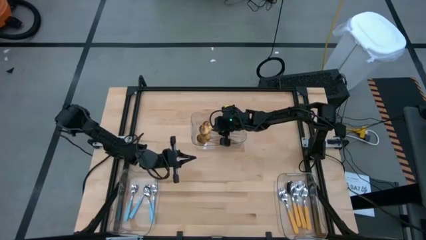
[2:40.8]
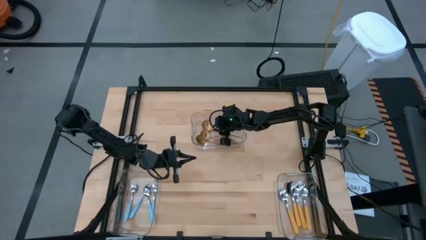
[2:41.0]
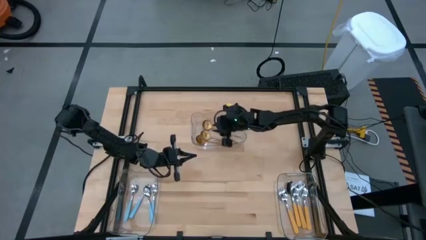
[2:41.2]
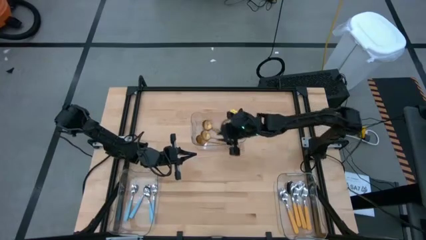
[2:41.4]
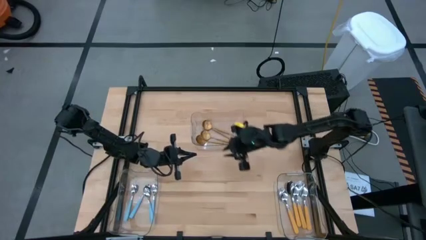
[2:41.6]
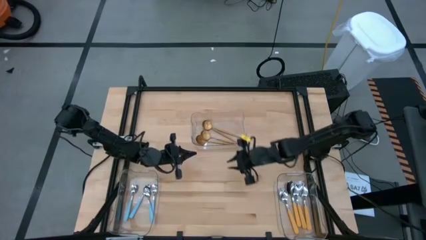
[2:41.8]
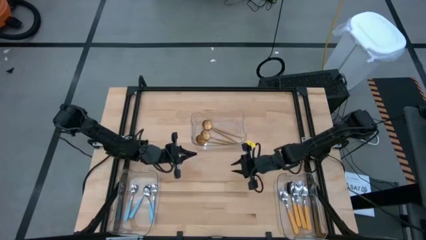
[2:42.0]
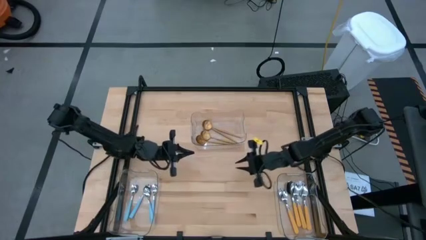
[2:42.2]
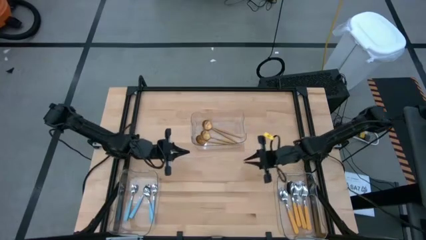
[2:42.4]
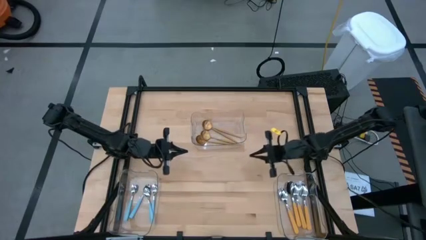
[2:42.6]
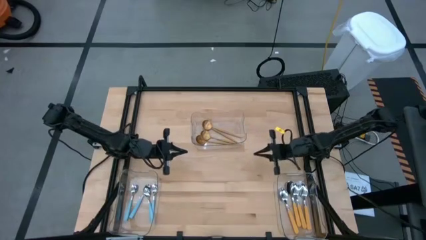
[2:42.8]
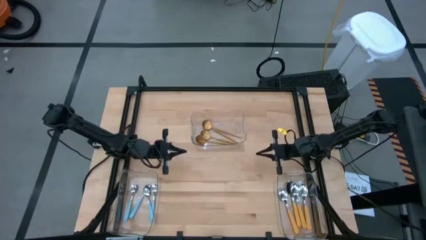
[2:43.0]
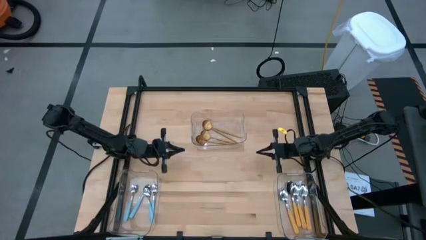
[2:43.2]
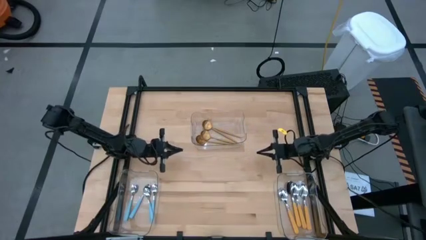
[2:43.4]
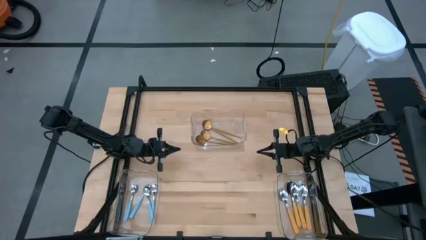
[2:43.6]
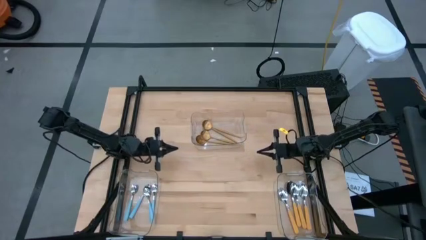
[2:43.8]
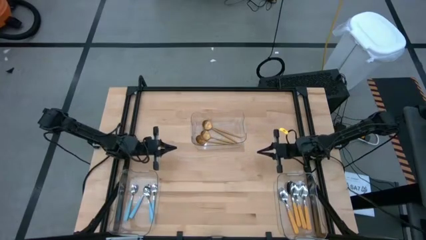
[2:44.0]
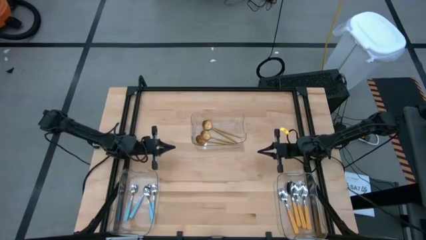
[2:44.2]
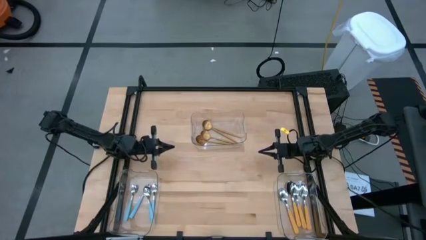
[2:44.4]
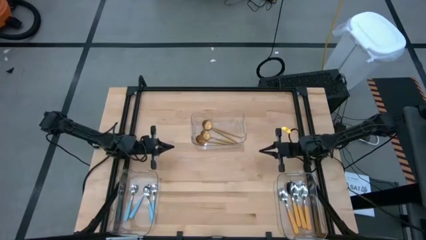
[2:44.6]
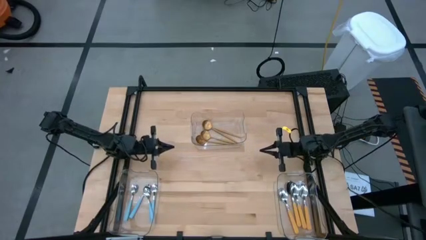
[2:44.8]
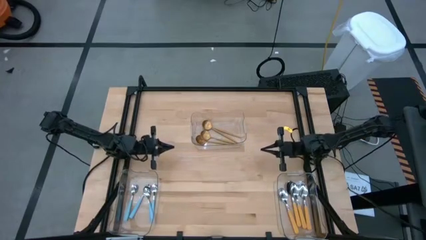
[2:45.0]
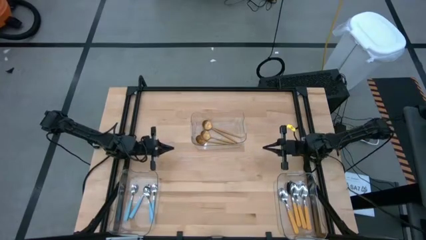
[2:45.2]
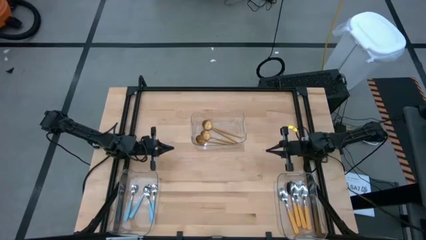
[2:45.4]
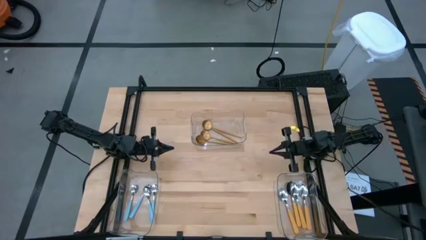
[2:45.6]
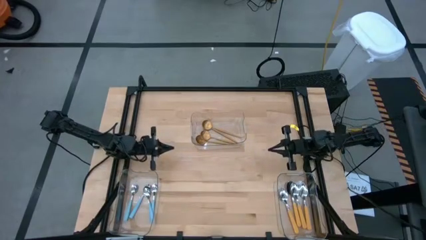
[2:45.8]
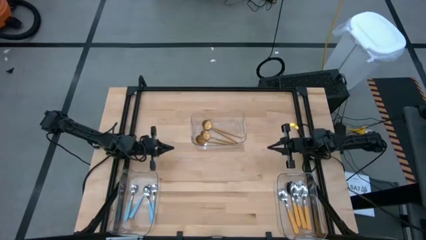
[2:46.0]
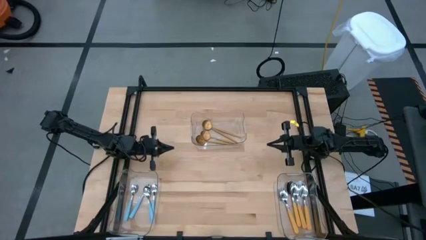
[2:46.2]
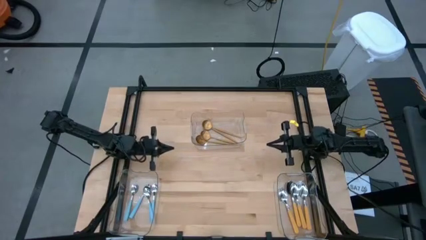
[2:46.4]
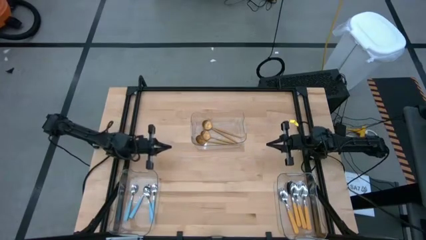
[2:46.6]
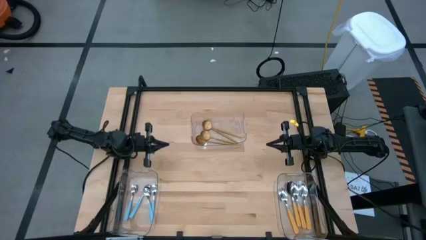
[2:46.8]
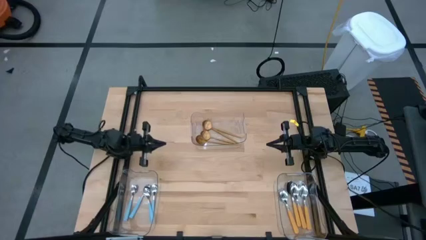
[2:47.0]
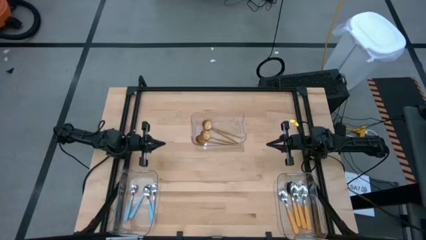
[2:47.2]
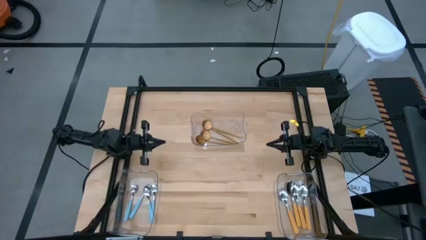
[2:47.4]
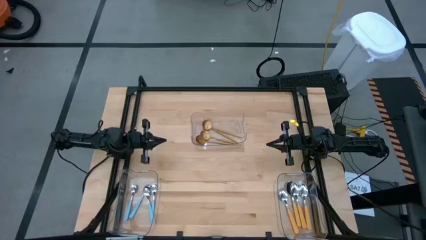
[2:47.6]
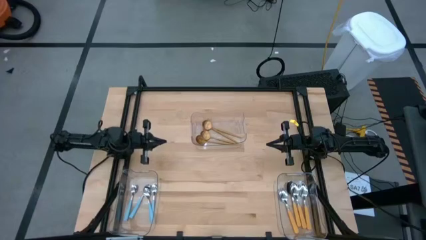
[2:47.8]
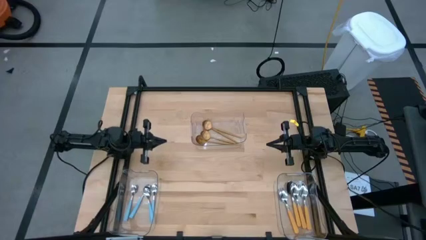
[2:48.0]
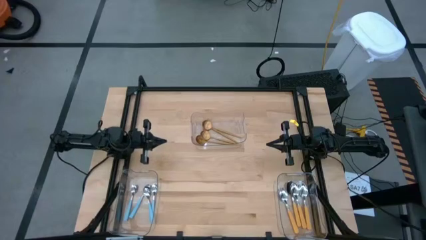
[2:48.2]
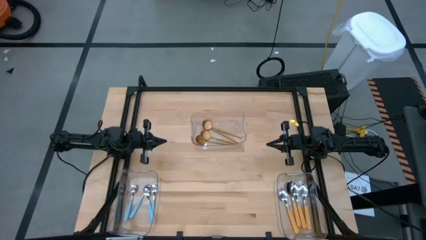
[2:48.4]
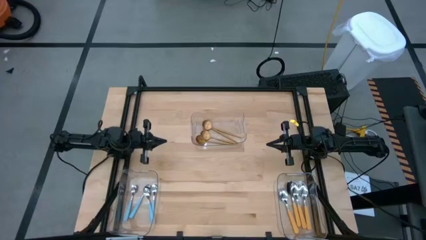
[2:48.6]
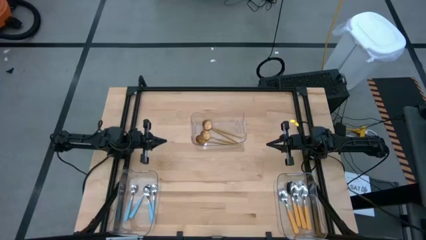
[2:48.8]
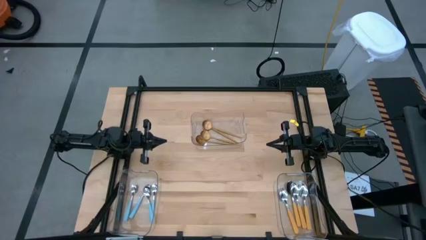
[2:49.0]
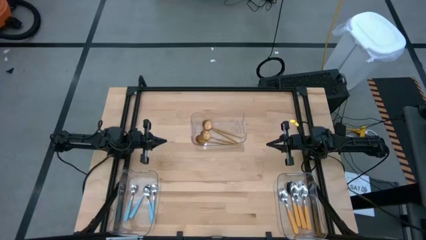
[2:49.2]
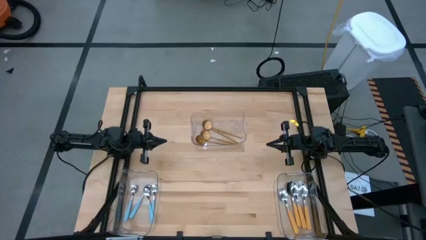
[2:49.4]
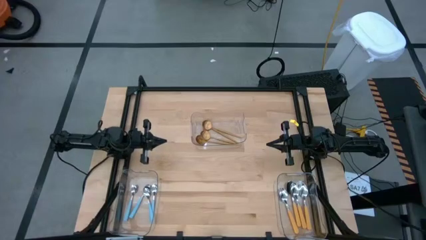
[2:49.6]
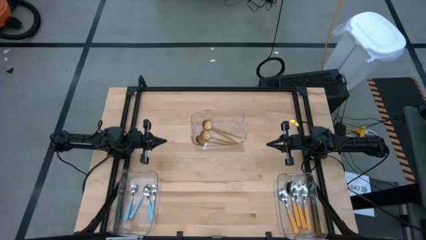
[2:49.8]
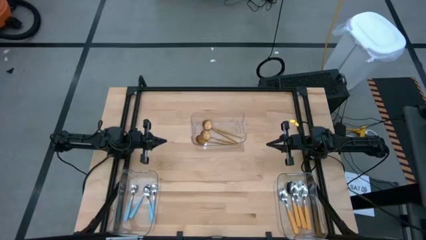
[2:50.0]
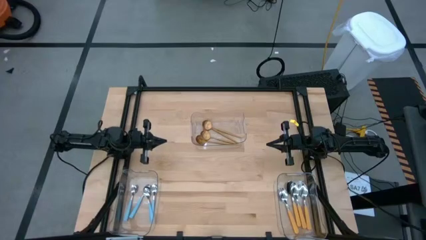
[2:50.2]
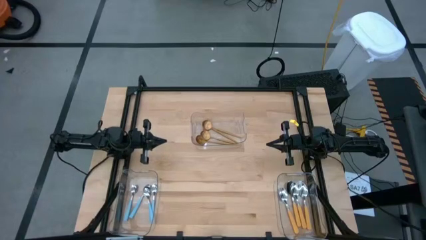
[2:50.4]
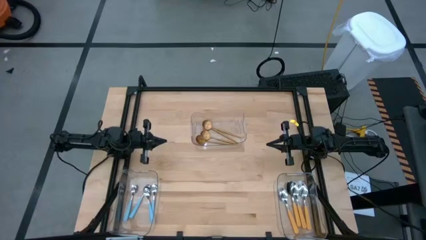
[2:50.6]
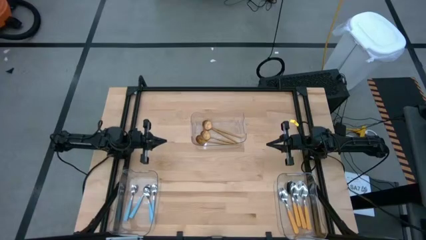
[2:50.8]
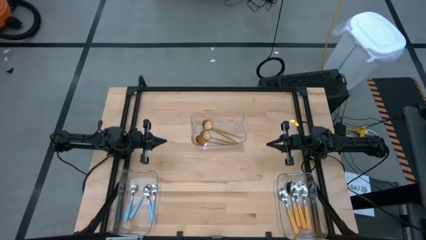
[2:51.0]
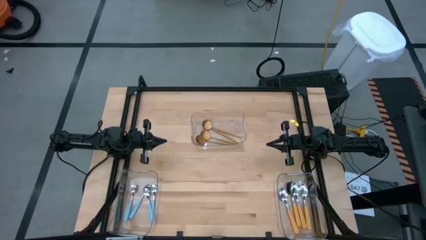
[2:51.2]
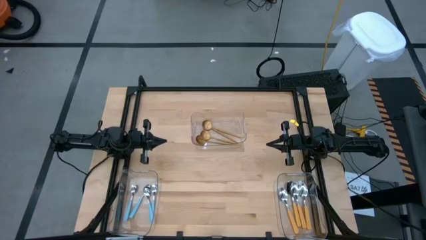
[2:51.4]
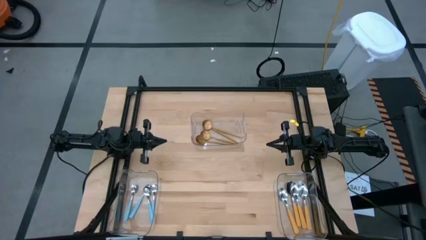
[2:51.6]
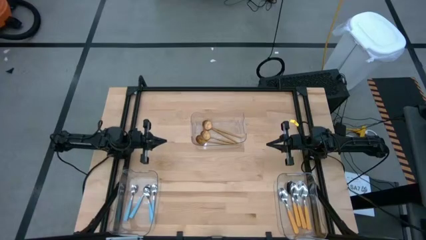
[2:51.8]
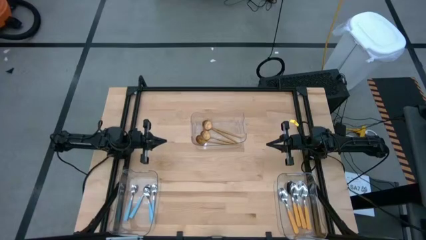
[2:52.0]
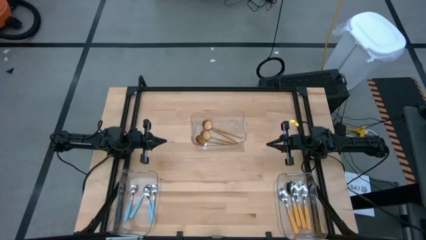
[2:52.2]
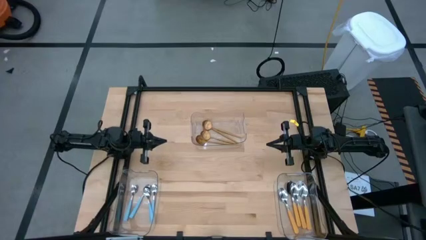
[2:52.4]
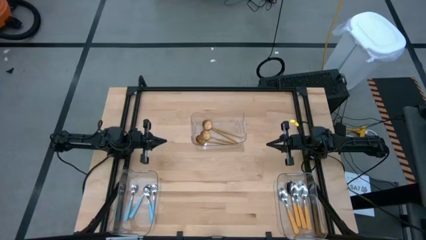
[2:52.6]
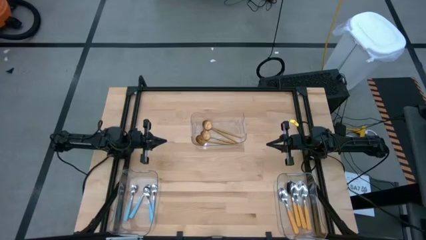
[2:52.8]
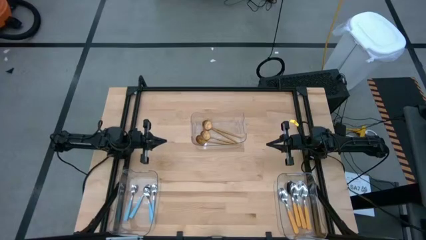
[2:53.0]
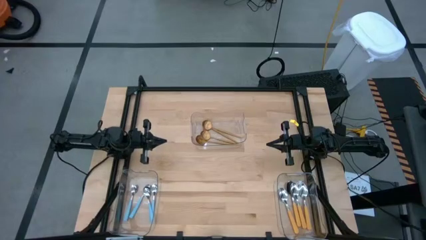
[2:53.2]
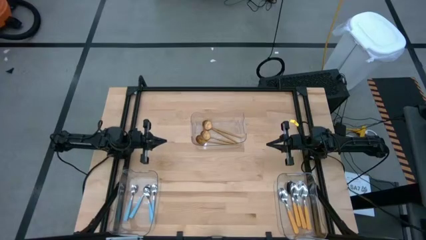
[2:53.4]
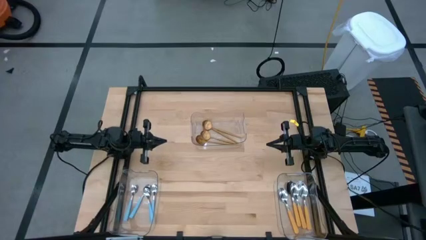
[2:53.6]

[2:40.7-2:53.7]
Task: Sort silverware by color (type)
Return to Home Position
